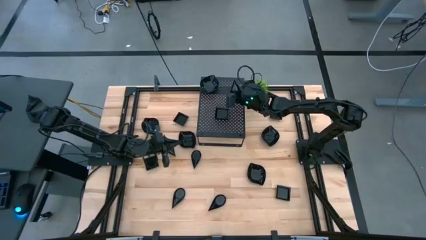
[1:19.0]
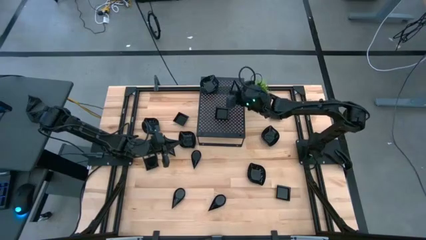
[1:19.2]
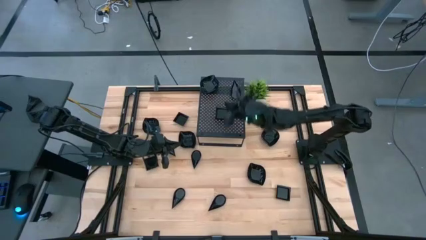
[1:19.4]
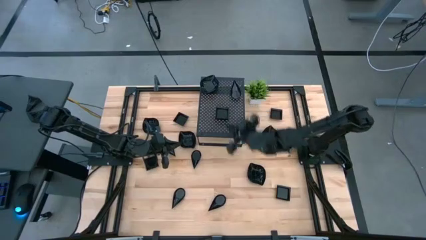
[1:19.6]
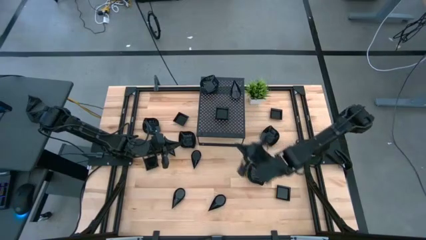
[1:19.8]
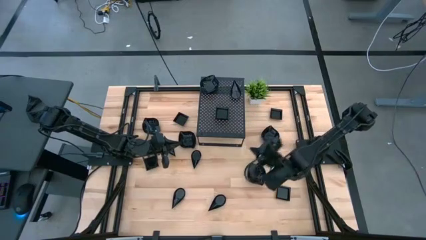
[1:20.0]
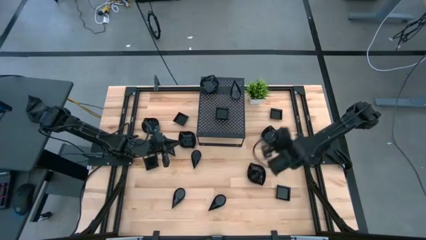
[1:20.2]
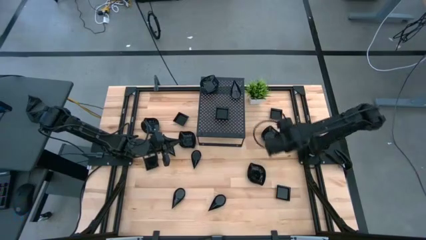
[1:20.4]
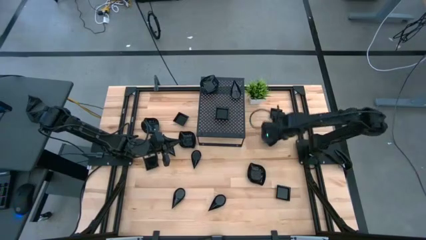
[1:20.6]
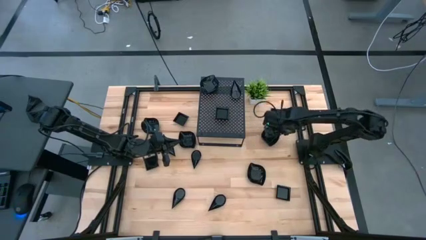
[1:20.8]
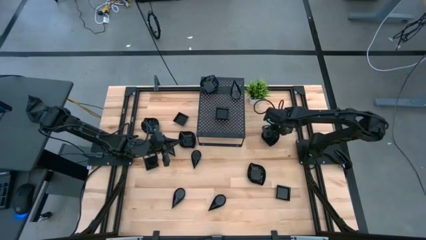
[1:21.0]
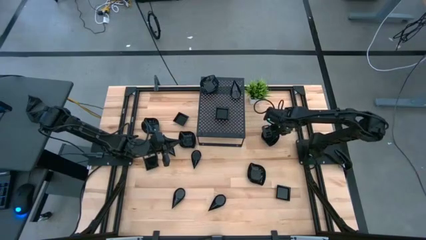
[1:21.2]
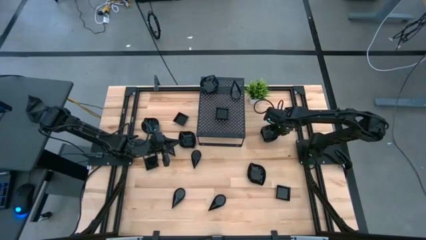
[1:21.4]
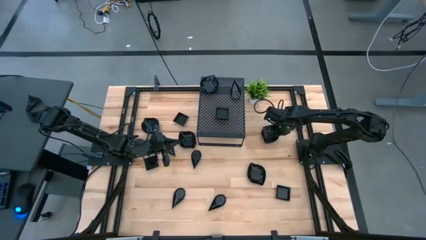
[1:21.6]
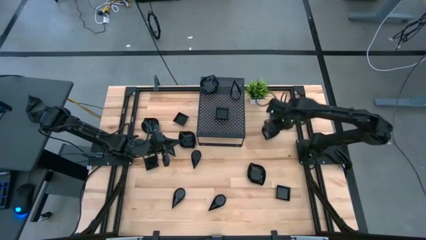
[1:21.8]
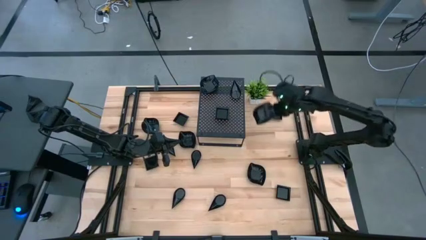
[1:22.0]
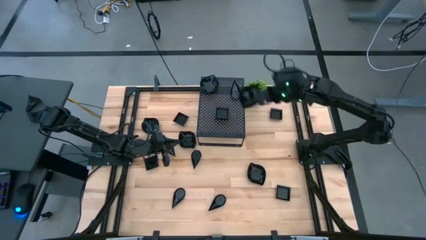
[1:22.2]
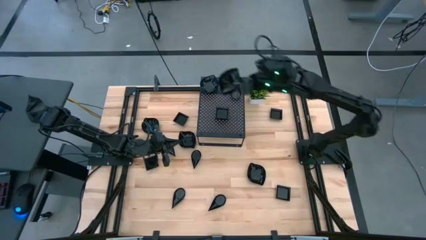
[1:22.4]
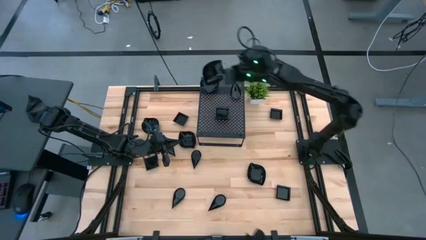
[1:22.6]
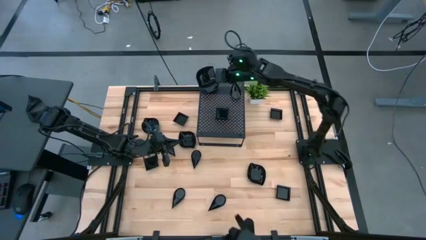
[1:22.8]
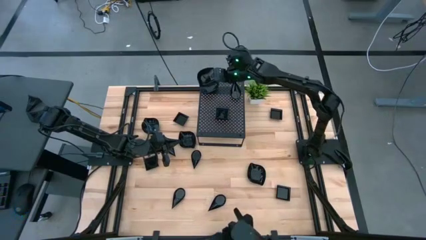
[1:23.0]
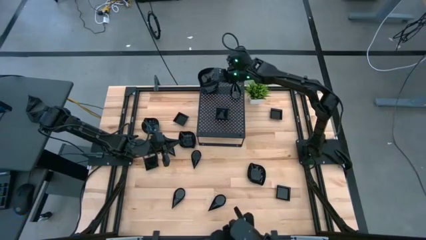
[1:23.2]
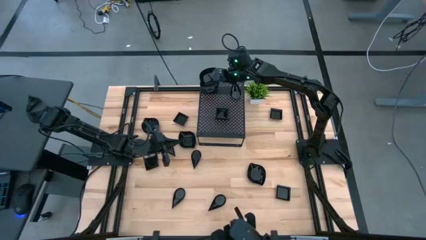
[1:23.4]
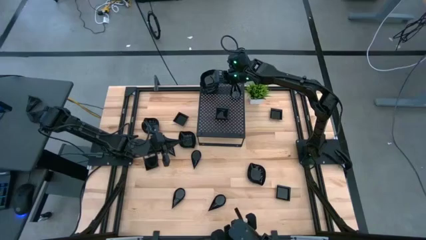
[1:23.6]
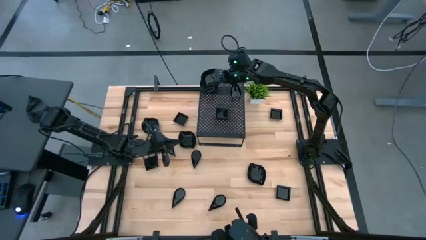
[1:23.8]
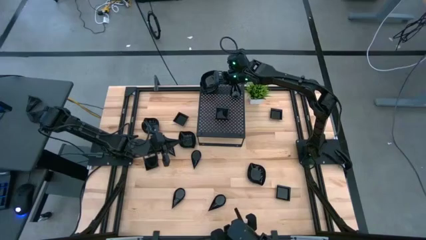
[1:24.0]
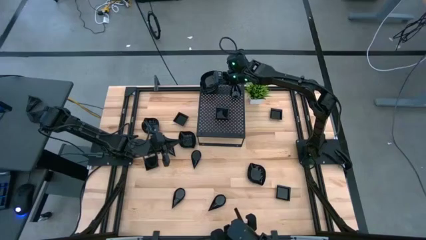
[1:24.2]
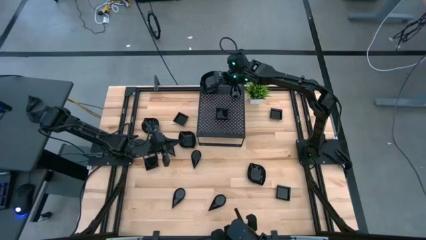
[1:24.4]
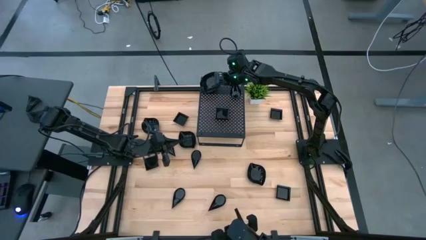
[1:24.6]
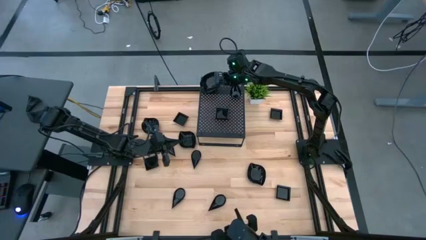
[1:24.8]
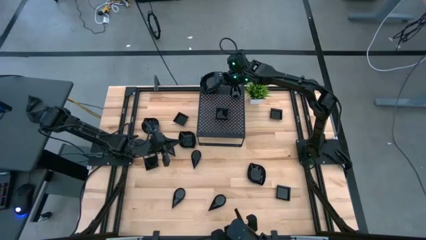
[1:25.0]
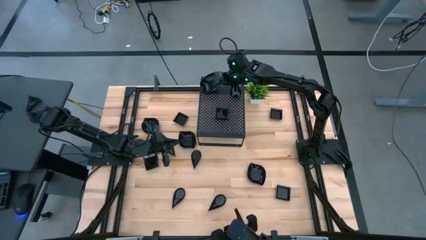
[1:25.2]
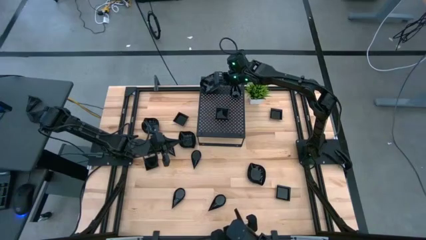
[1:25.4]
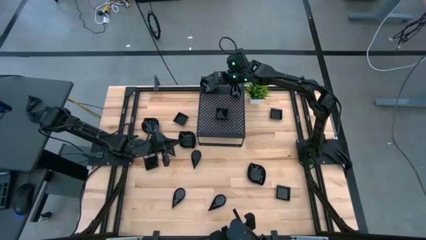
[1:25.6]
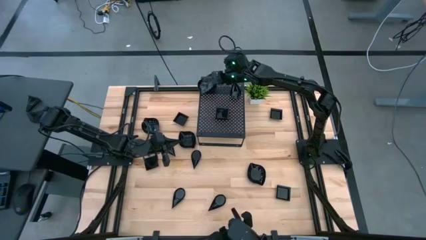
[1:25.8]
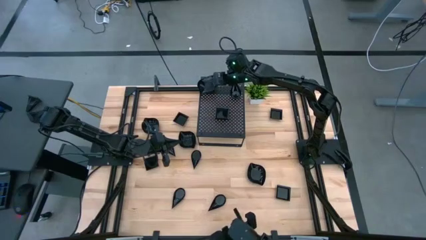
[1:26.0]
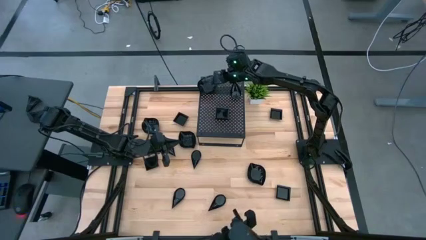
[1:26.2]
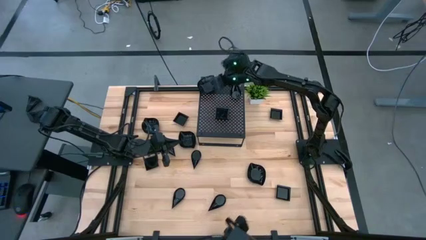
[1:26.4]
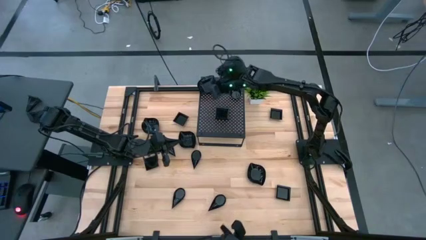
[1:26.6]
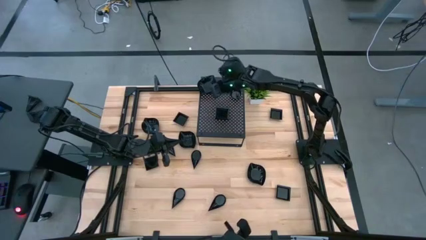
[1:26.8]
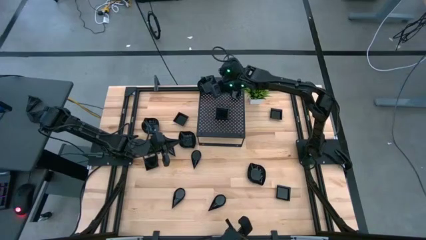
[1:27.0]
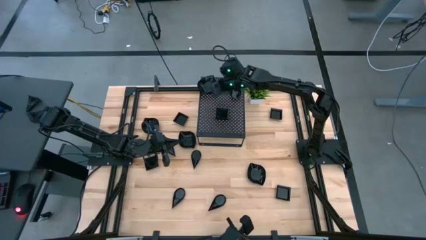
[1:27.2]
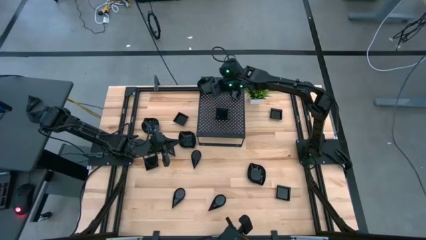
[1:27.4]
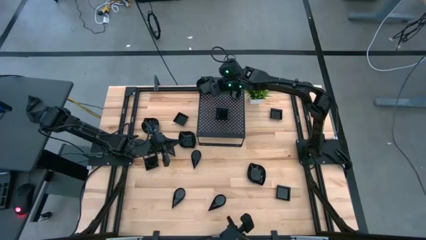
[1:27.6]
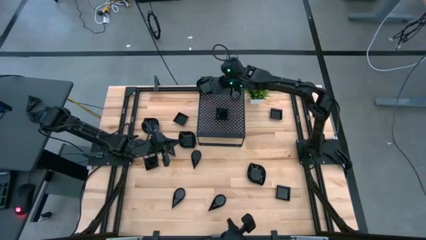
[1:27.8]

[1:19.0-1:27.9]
Task: Pick & Place Mini shaped plates
Stack the black leaf-shaped plate on top of the black leaf-shaped plates on the shelf

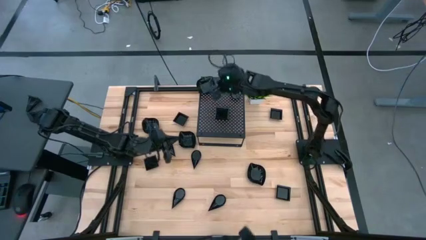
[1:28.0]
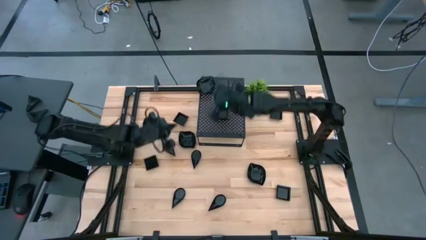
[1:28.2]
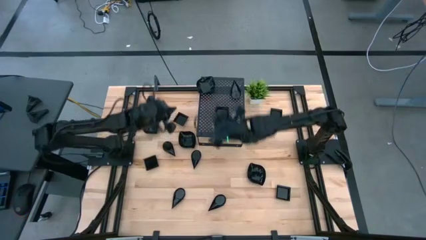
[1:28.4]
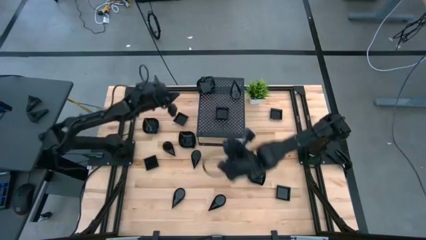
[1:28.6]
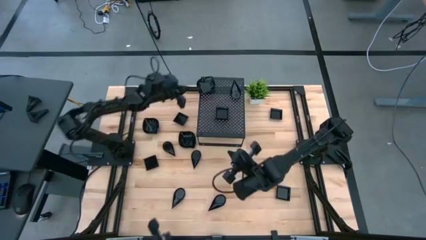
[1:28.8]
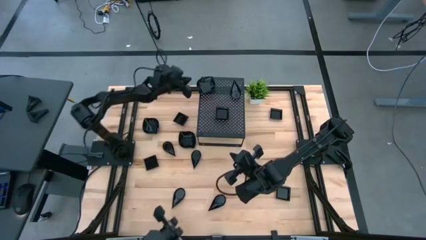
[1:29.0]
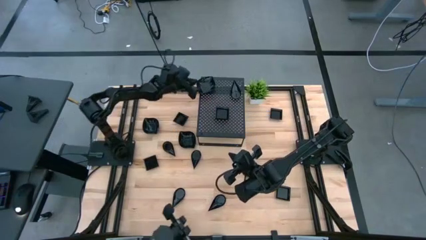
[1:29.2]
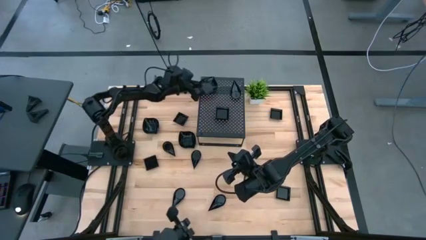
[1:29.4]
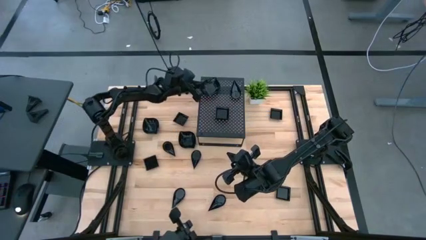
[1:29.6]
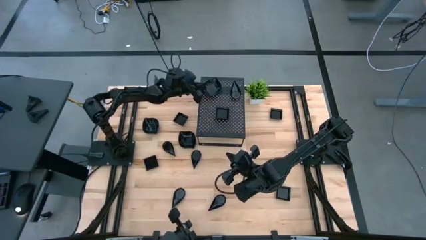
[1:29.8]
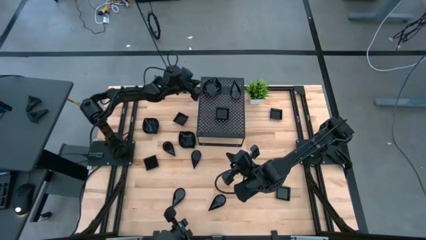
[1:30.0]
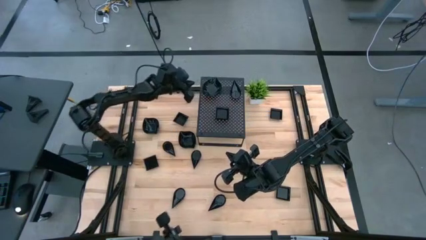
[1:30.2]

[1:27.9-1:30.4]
Adjust the black leaf-shaped plate

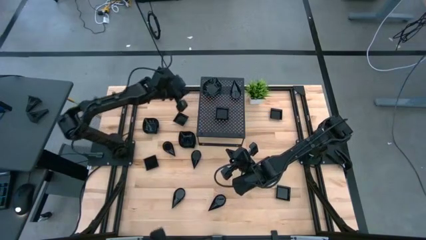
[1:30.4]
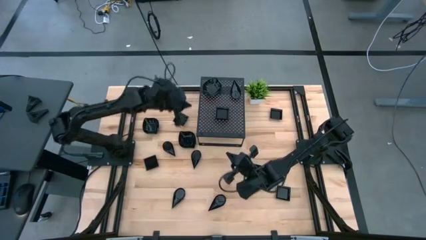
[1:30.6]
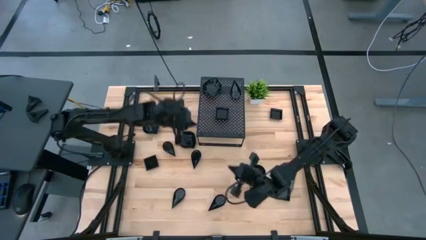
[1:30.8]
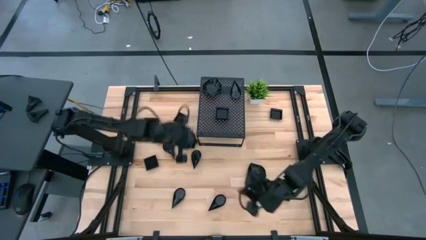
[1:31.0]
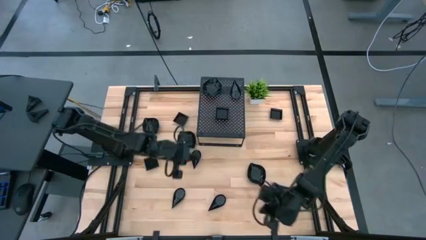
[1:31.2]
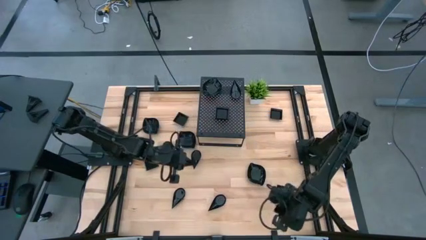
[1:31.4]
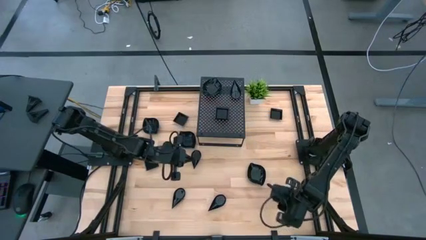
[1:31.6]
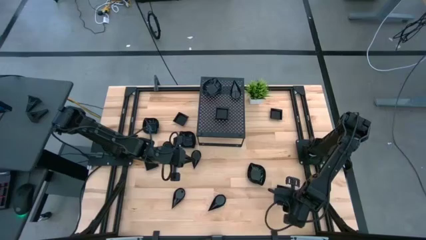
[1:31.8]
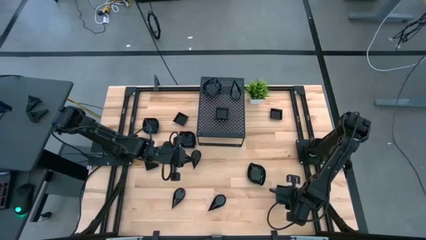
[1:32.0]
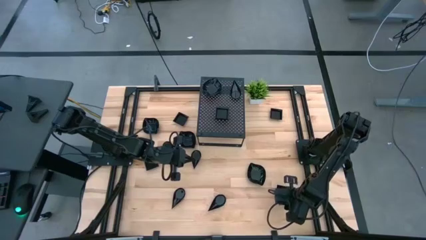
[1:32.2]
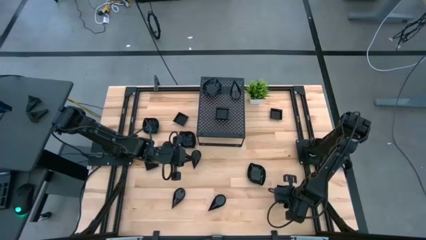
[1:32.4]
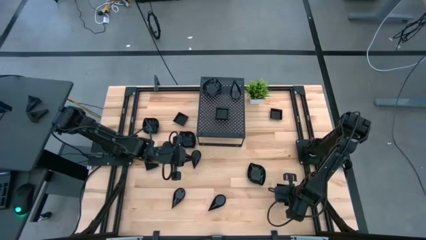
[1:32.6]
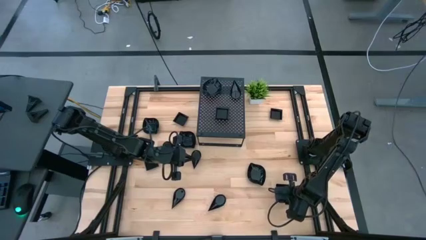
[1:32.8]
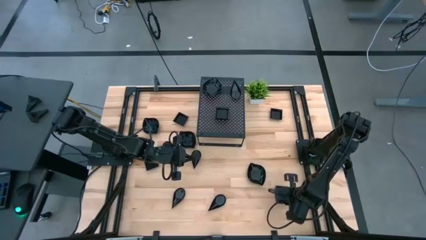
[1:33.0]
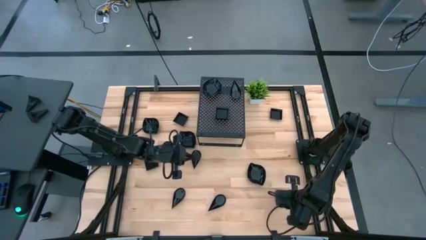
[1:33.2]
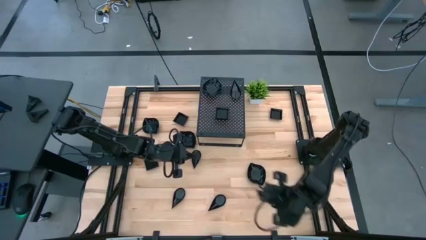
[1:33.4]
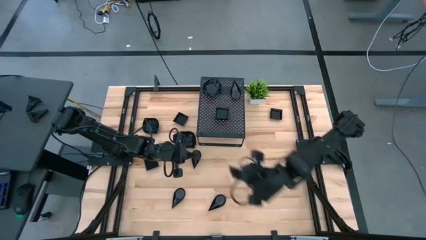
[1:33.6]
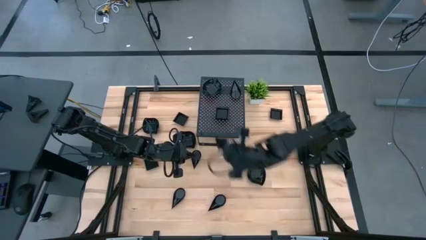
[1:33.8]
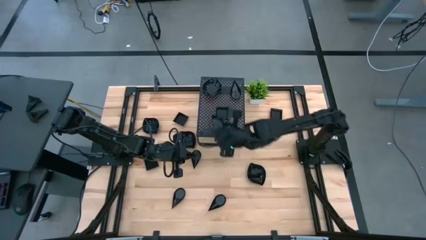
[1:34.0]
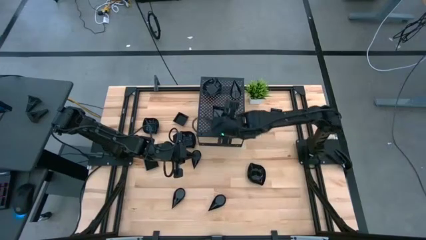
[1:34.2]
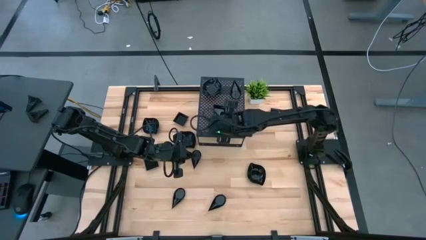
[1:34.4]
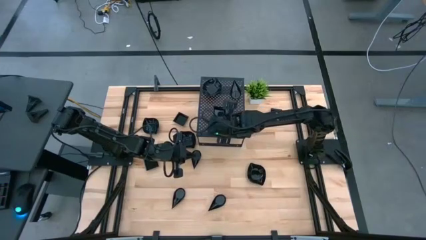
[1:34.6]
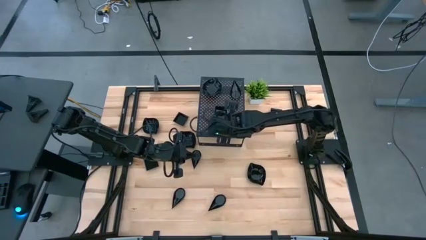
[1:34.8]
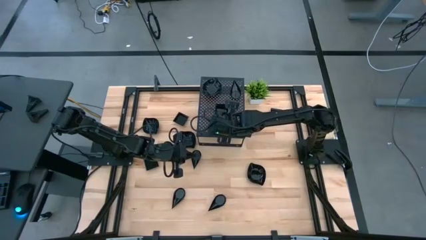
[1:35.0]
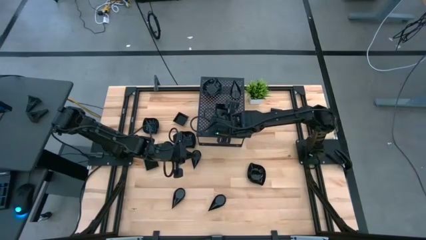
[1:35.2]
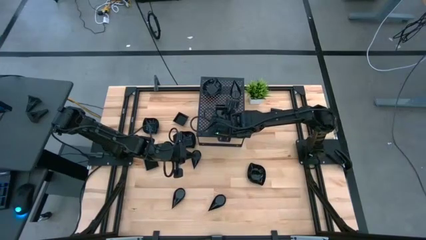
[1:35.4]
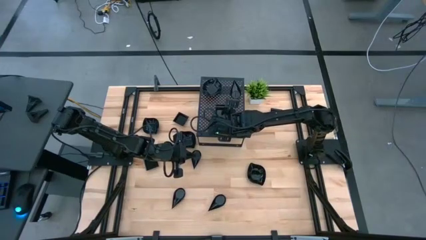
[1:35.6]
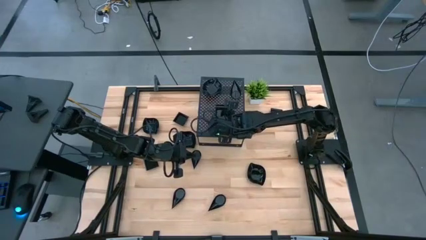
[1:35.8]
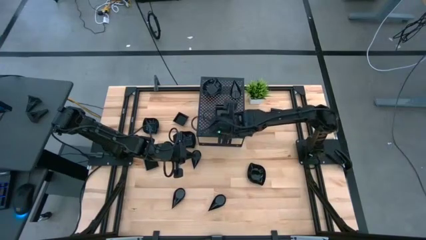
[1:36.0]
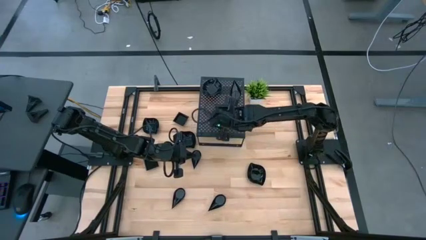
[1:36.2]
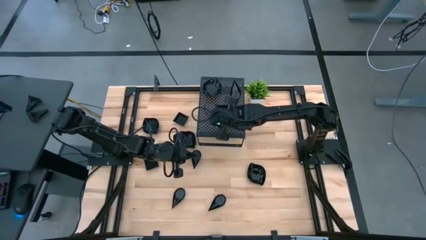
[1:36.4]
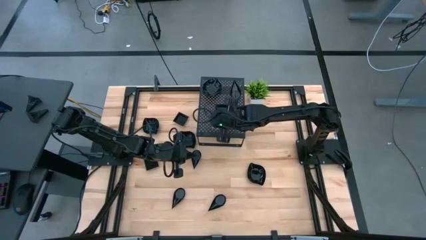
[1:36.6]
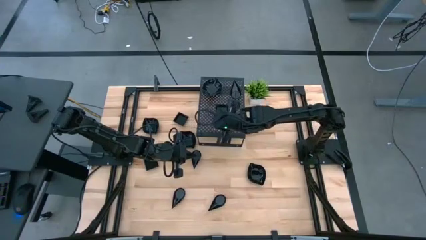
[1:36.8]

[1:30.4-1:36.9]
Stack the black square-shaped plate on top of the black square-shaped plates on the shelf
